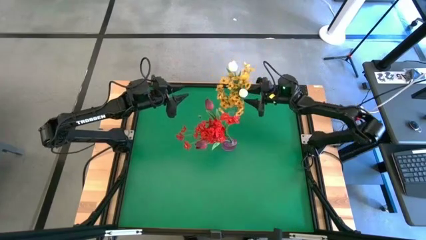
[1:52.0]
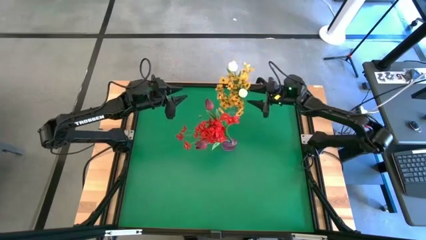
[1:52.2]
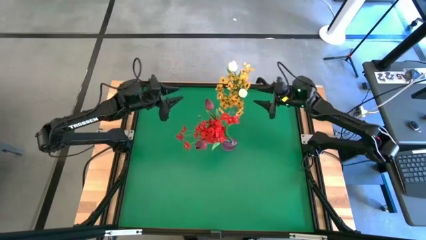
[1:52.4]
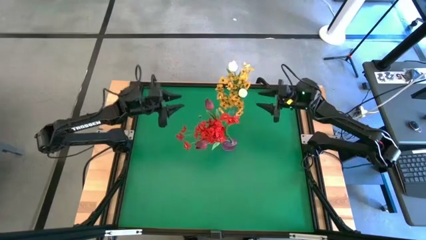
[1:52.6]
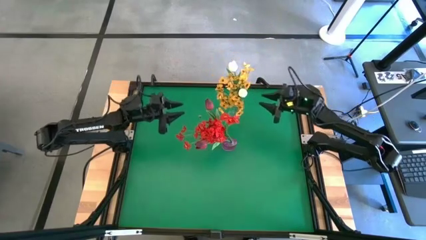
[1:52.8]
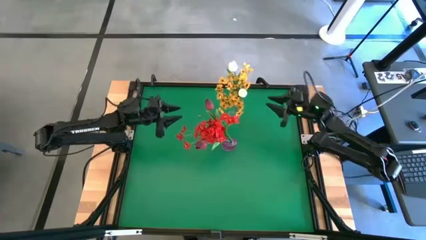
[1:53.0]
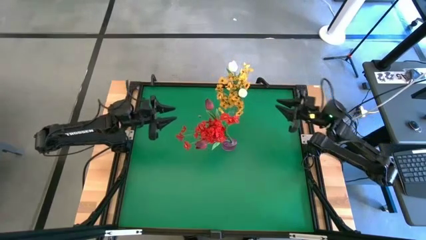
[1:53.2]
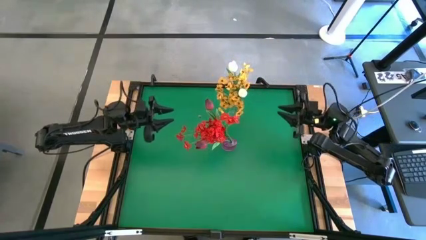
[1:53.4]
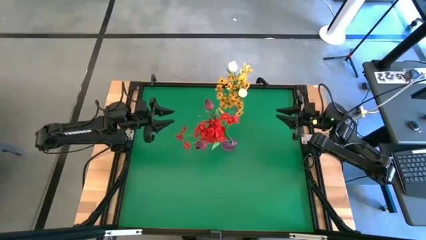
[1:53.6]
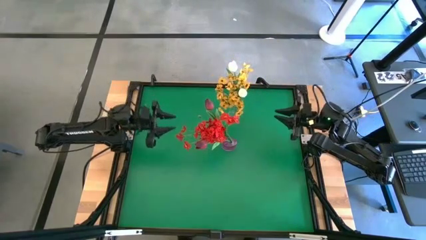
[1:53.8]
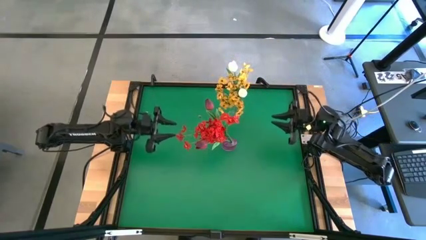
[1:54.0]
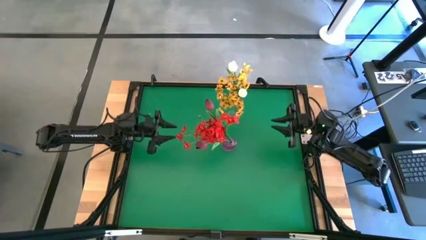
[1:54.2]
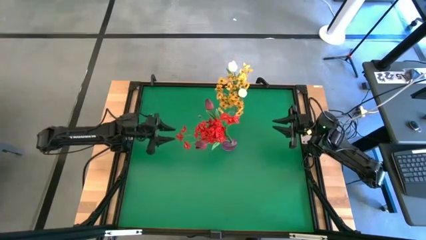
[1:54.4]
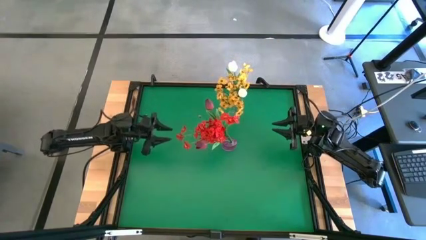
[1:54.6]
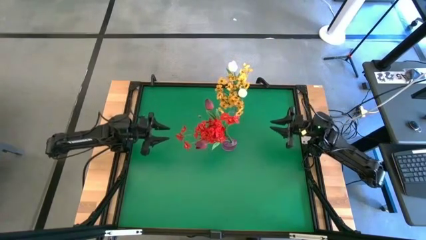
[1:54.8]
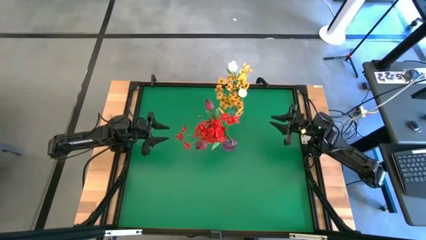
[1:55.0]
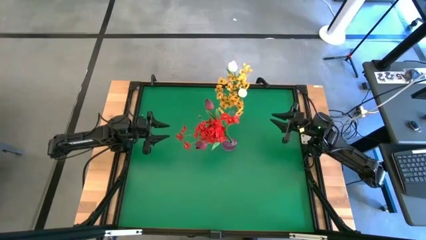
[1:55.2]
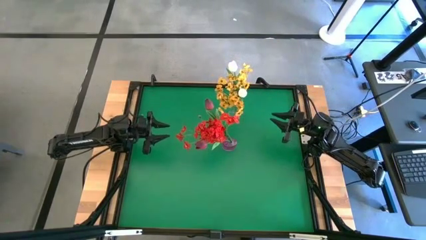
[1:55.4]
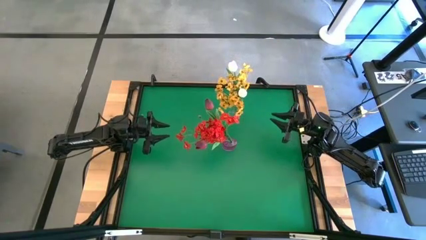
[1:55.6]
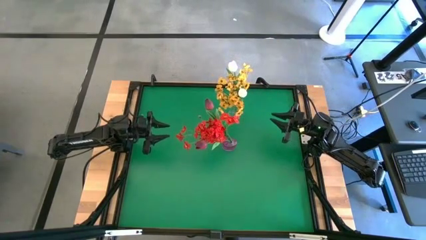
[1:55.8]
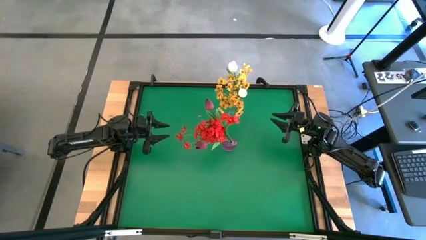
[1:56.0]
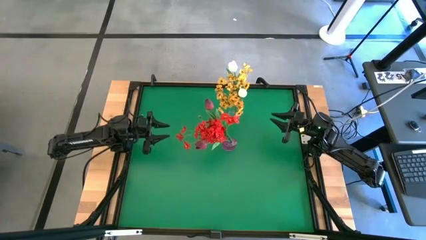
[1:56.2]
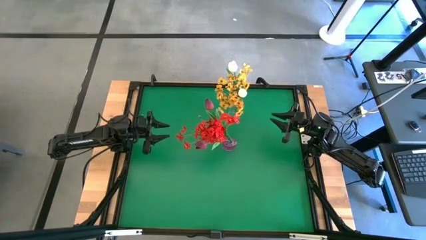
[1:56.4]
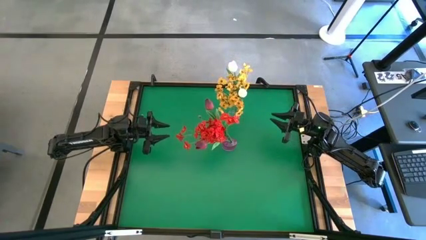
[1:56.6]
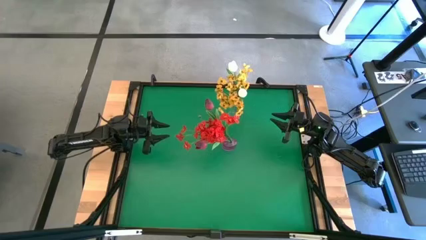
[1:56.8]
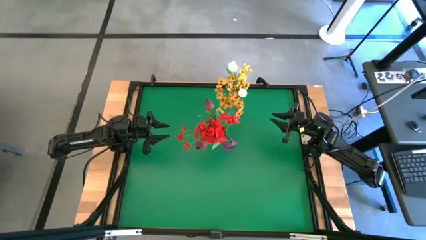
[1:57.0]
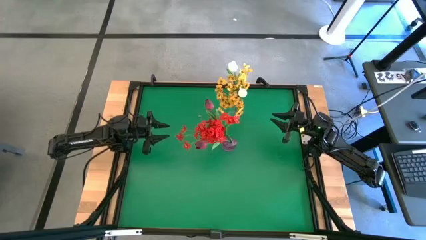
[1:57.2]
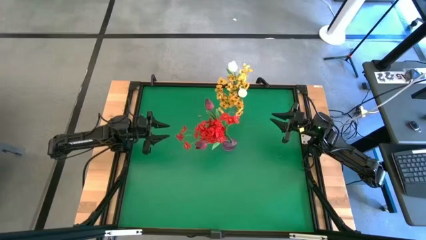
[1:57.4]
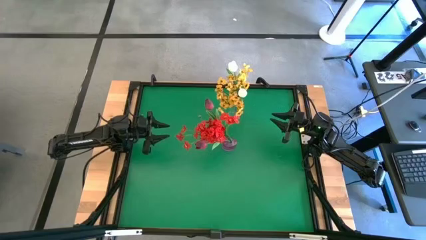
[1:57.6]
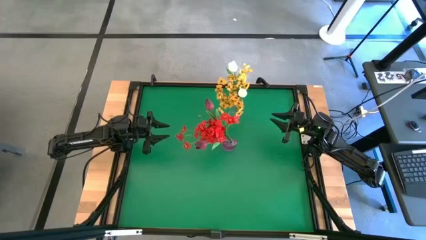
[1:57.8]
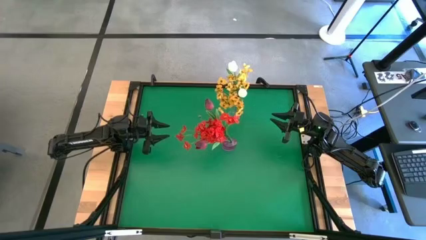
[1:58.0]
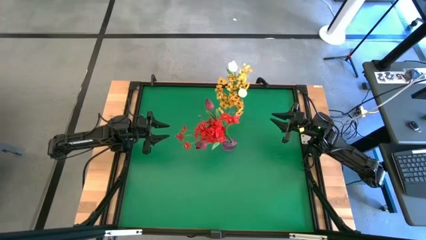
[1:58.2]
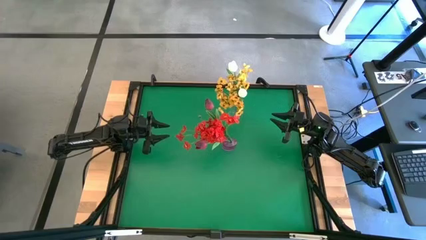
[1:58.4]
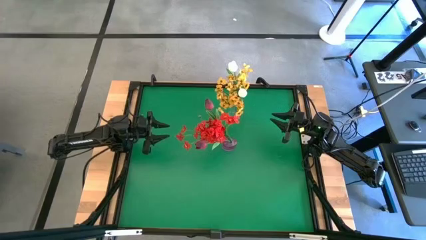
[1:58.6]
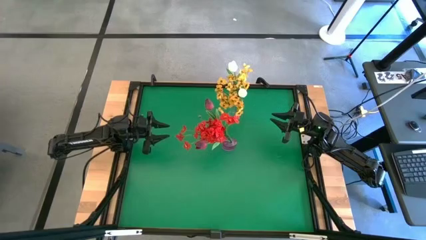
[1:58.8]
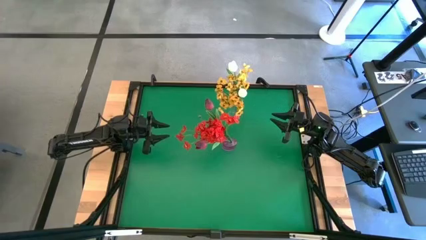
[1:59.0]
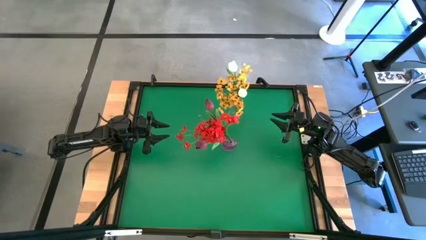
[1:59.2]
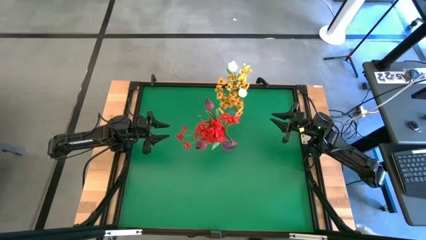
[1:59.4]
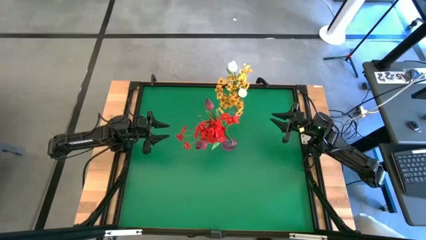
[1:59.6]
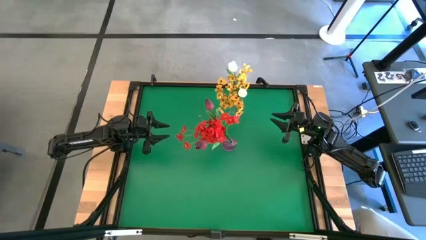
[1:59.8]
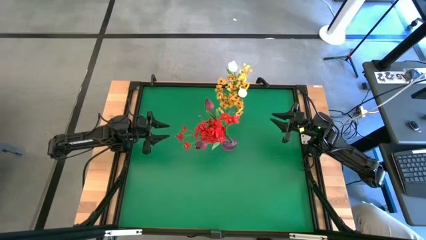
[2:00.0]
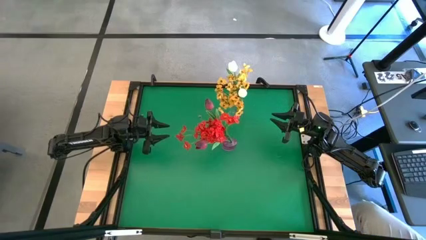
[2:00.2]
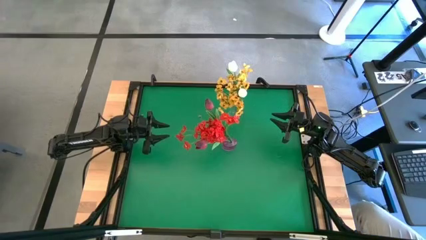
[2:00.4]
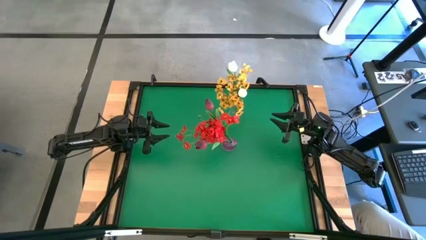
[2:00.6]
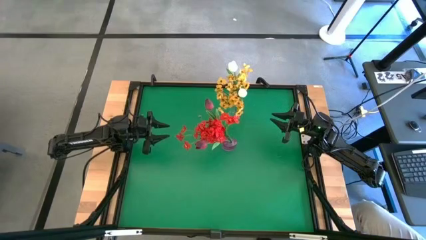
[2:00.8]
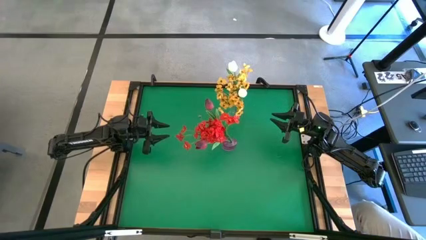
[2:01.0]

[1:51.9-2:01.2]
Task: Sort flowers into vase by color
Return to Home Position

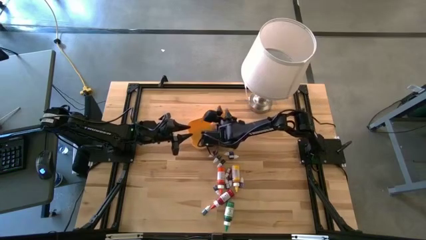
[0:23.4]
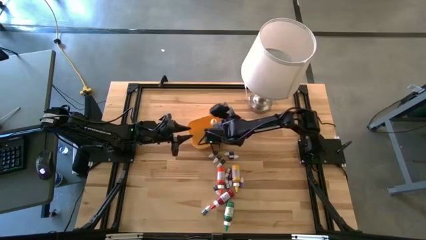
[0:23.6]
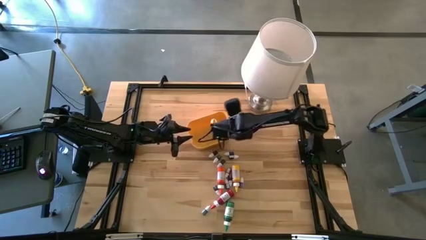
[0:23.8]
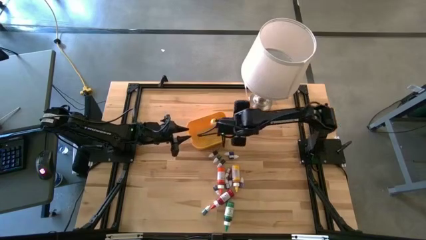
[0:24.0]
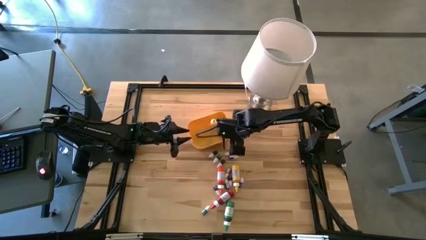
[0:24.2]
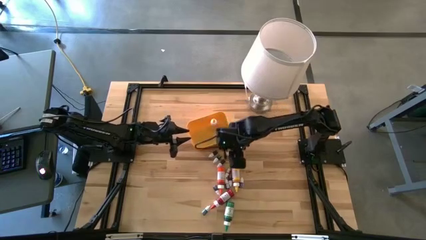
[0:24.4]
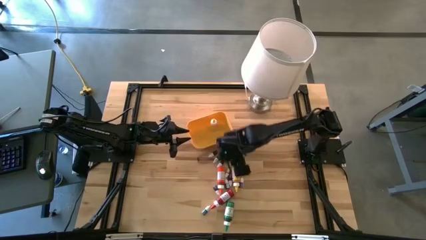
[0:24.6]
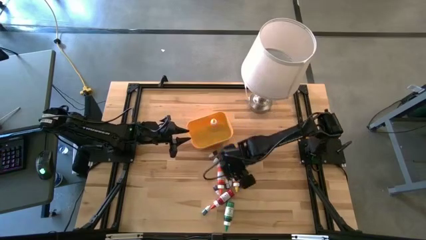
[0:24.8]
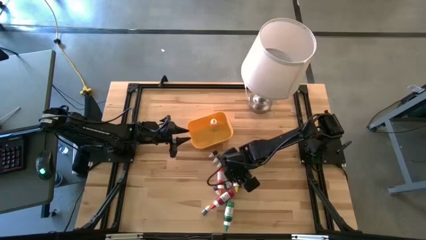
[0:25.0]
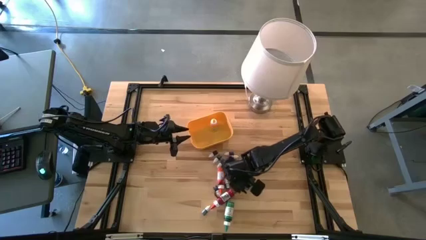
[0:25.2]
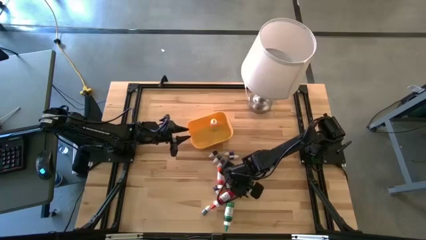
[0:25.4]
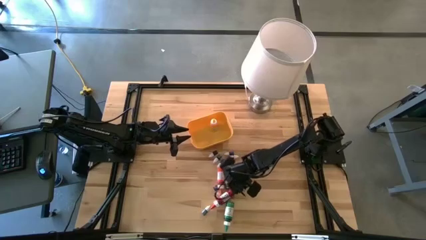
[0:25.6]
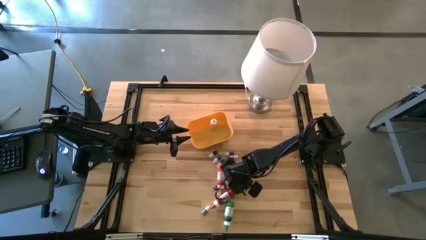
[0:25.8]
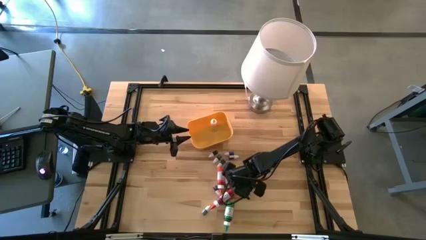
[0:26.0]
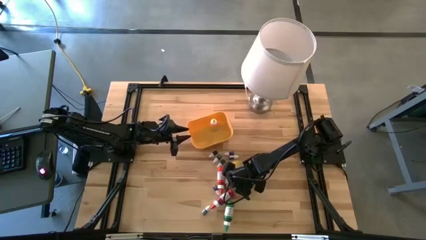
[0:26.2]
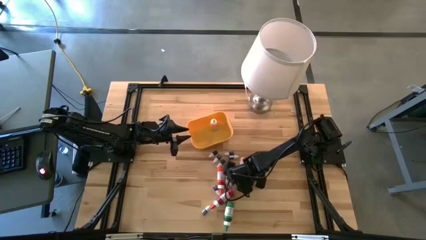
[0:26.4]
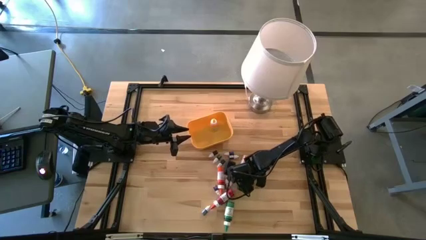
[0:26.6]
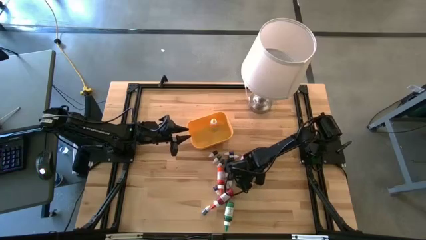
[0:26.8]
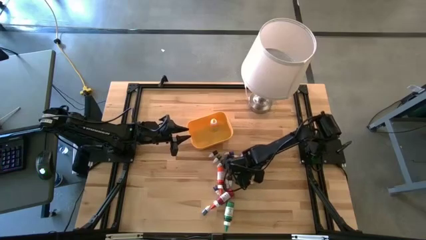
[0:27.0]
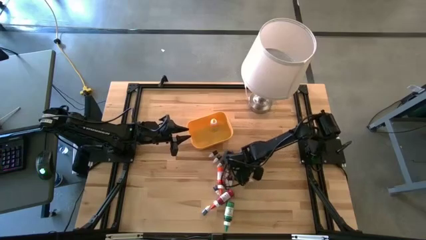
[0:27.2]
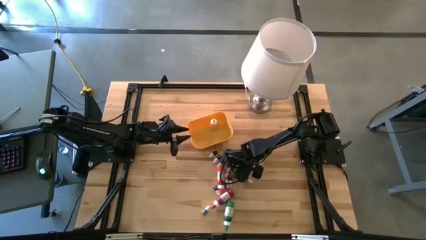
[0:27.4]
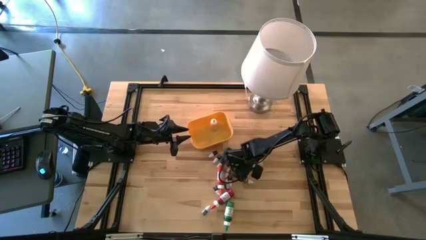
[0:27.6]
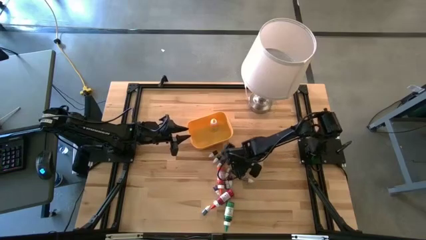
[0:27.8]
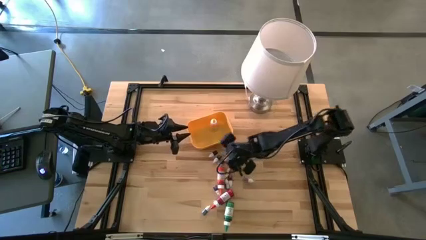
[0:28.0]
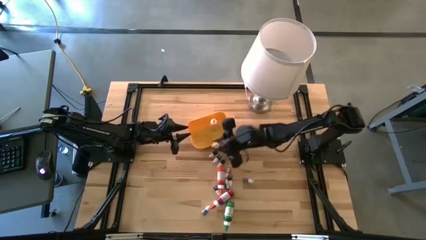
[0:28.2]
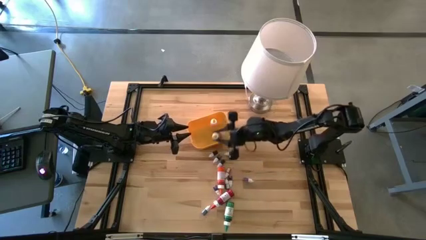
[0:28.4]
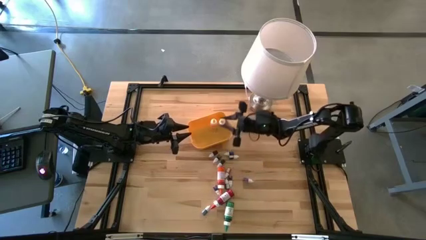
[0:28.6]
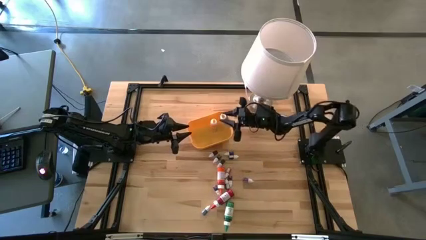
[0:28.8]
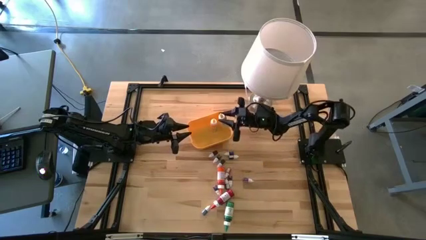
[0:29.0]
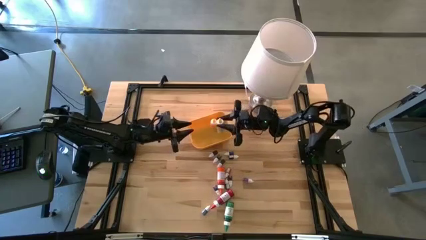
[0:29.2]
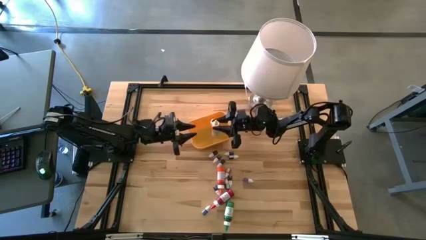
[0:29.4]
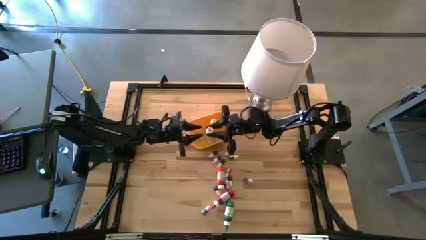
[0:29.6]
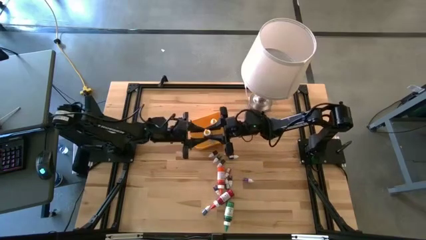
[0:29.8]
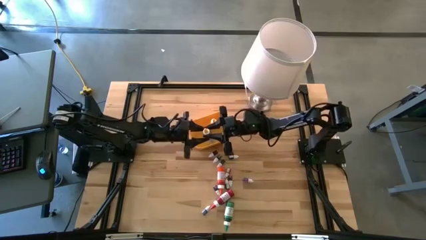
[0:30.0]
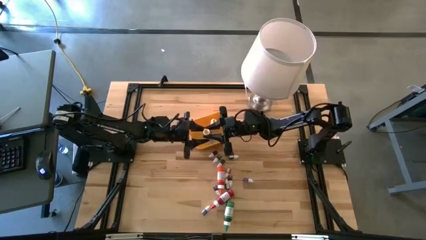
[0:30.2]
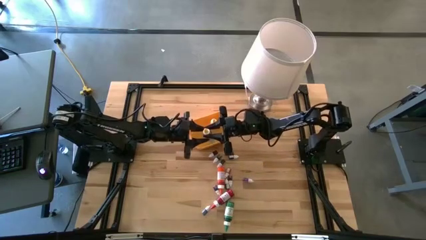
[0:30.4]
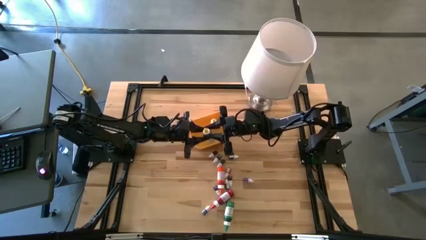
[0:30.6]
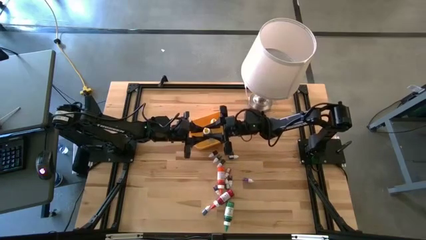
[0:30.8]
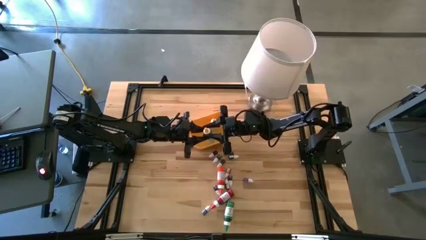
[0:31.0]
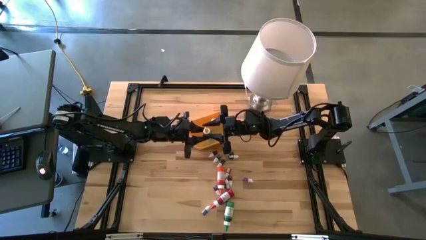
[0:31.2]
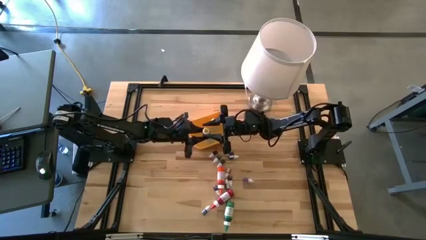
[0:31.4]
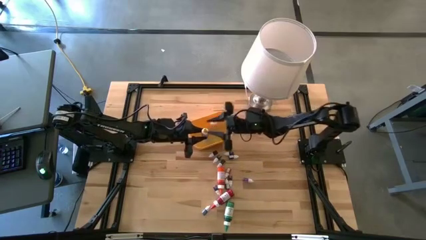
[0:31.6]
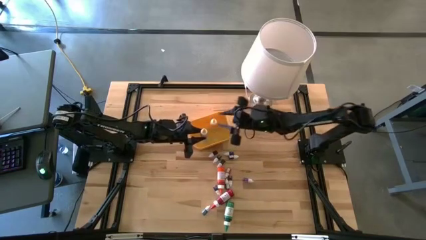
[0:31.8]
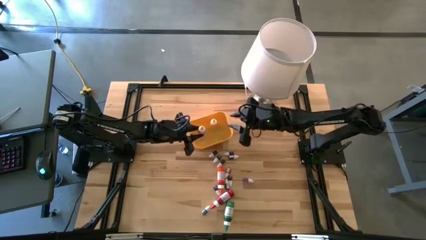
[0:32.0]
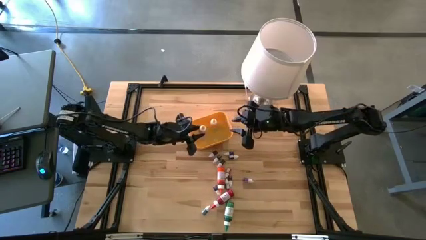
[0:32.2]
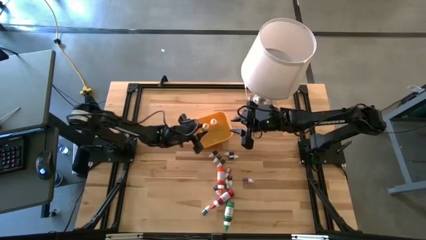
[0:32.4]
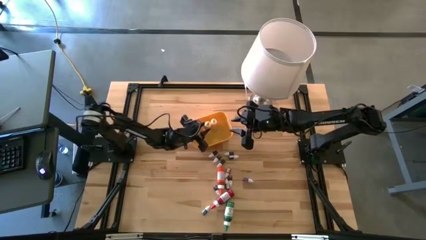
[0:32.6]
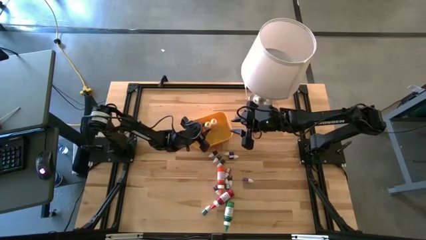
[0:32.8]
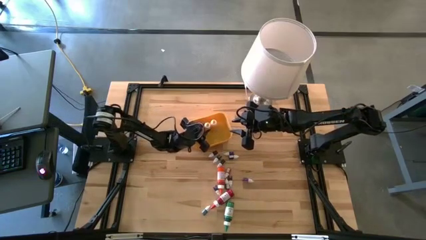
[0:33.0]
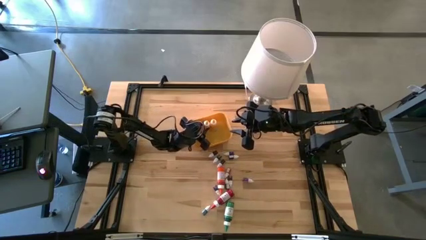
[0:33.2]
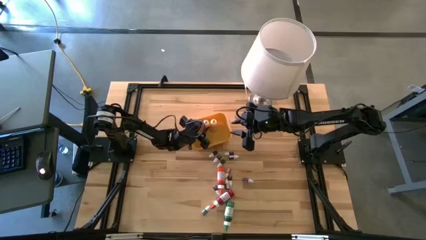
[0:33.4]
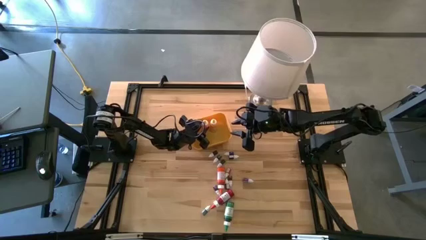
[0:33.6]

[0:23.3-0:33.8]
Task: Pick & Place food coloring
Put the large yellow food coloring bottle into the yellow bin
